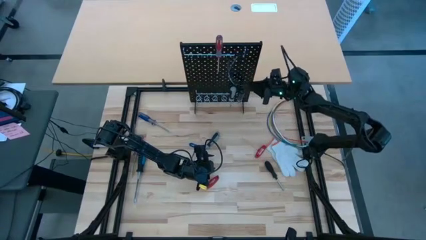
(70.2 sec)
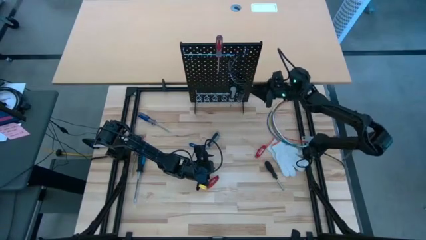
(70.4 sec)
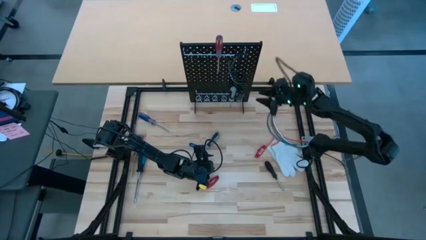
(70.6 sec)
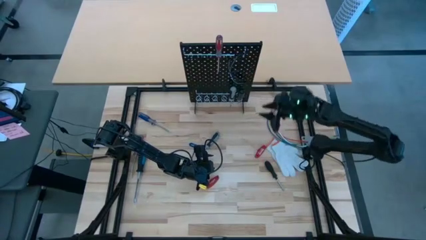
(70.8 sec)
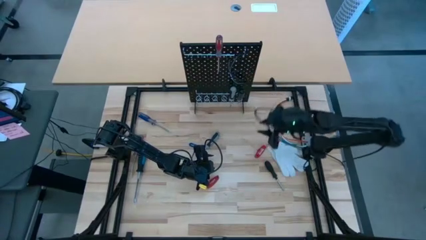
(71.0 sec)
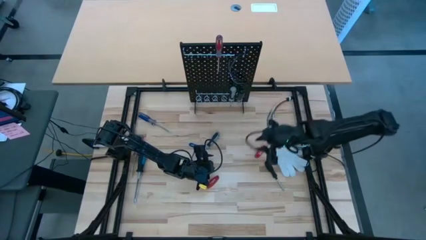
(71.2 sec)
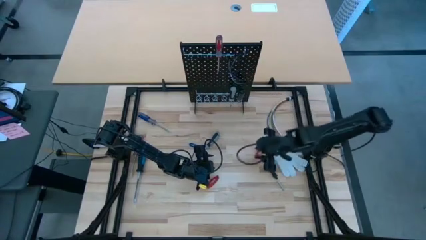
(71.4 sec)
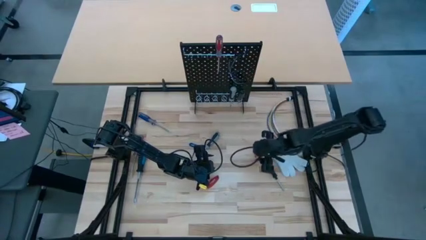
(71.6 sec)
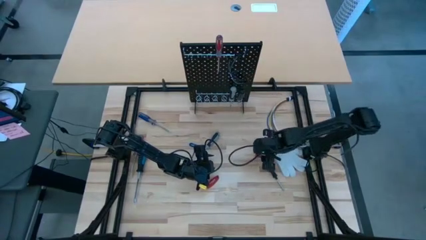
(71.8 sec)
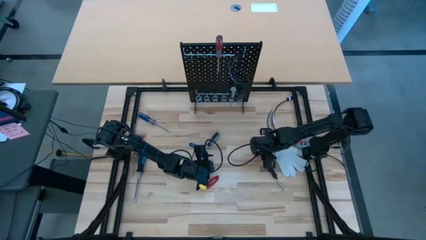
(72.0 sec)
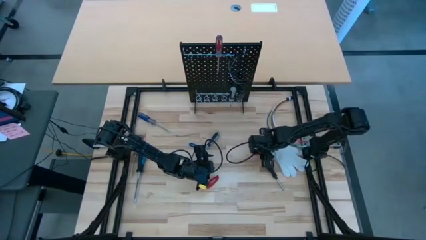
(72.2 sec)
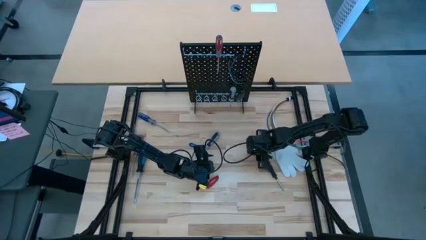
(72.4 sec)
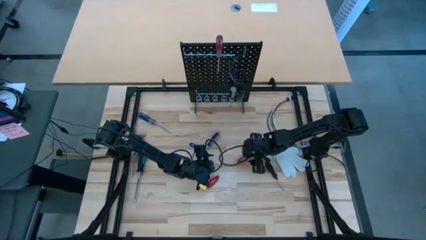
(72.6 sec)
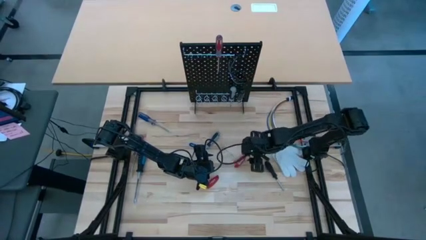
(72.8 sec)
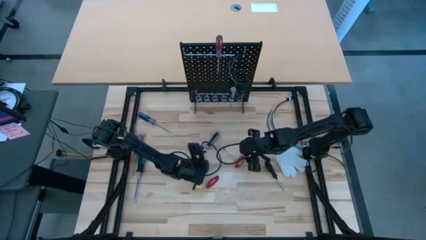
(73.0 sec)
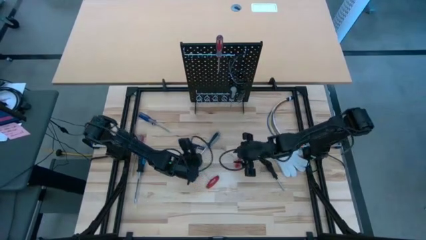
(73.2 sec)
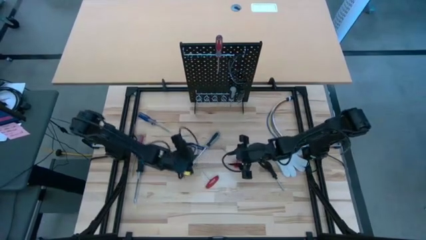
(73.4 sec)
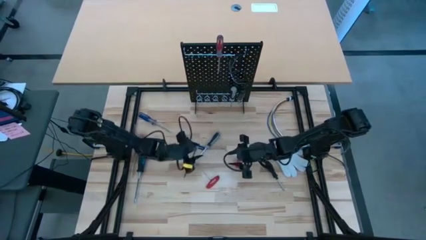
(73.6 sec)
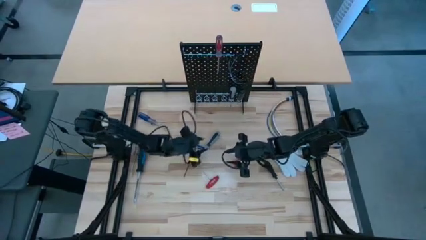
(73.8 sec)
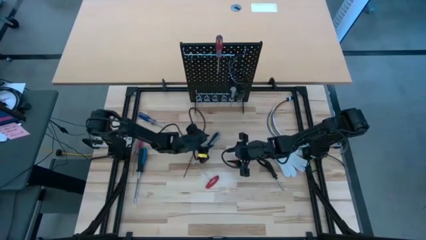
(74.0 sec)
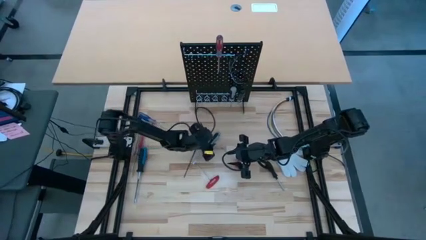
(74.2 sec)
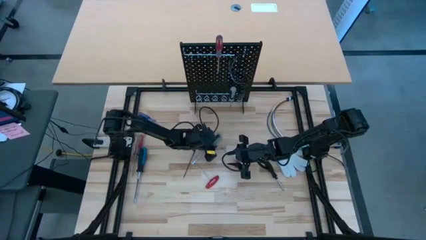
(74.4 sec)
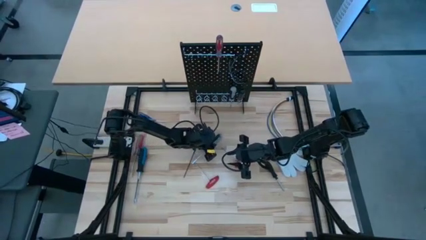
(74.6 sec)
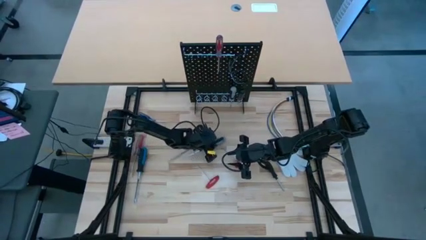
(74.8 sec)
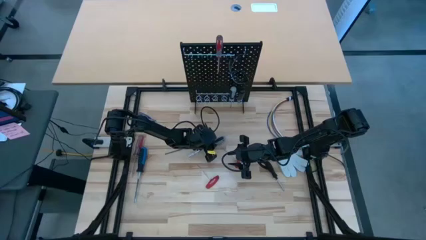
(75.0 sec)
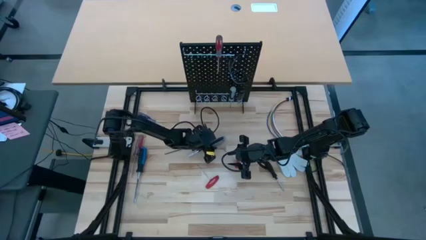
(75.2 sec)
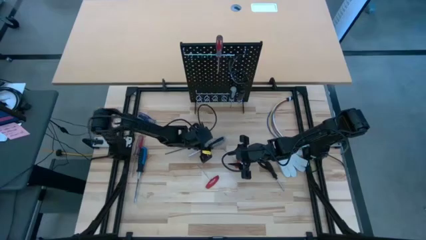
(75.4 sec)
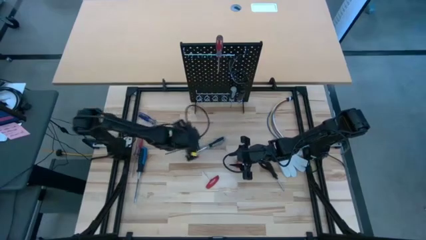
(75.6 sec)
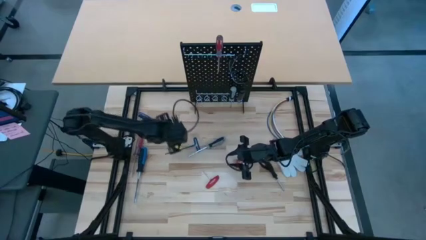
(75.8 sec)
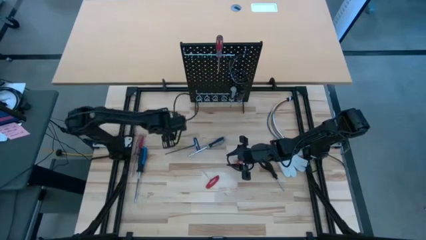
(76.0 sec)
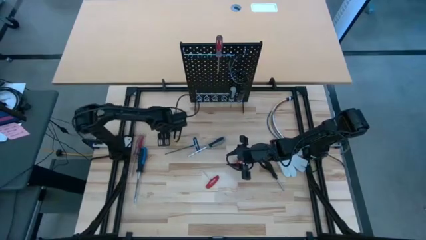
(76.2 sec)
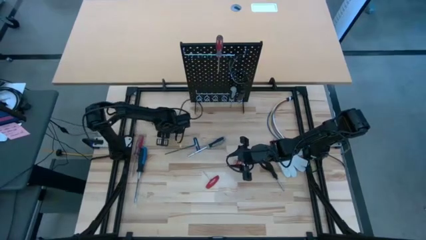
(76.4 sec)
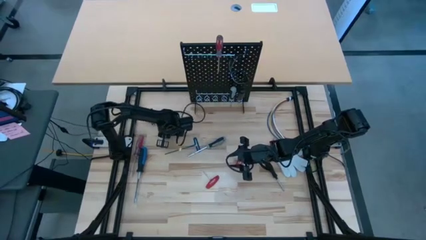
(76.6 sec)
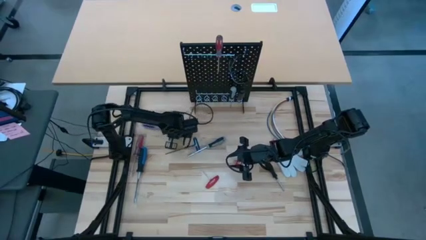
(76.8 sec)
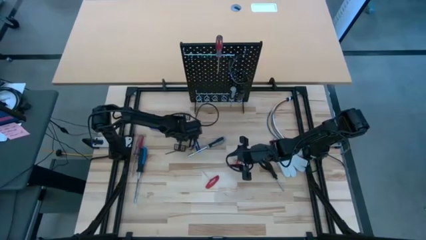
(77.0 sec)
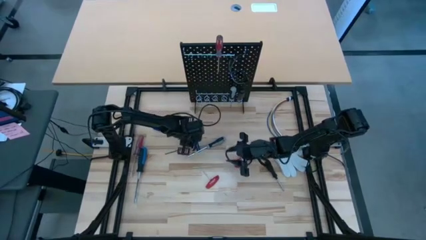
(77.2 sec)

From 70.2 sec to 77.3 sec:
Task: Hang tools onto peg board
Hang the transparent blue screwdriver on the pegboard

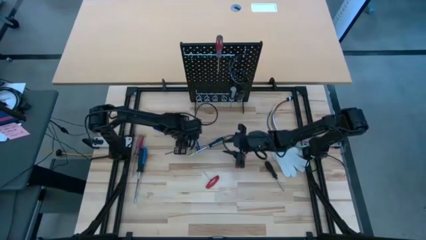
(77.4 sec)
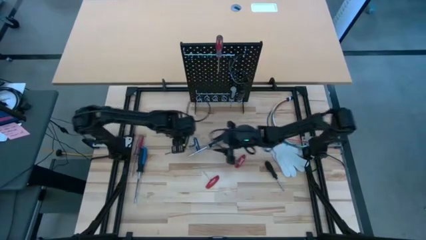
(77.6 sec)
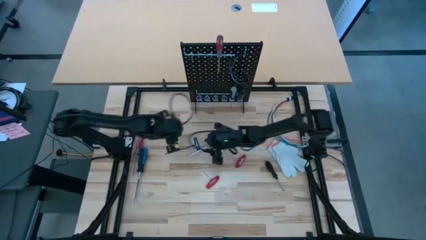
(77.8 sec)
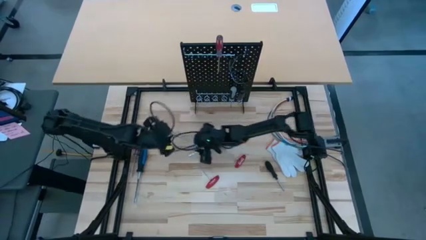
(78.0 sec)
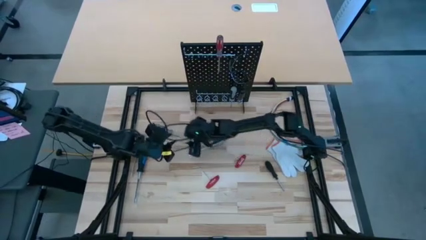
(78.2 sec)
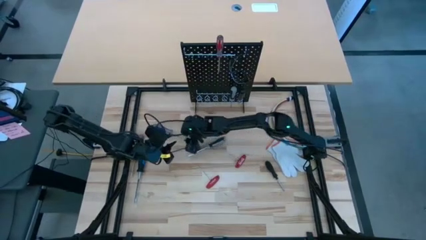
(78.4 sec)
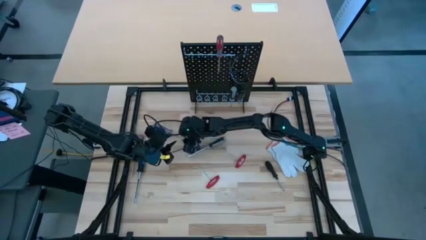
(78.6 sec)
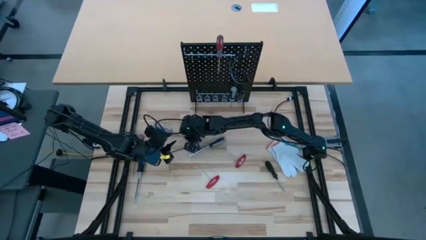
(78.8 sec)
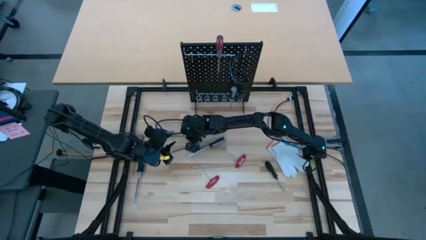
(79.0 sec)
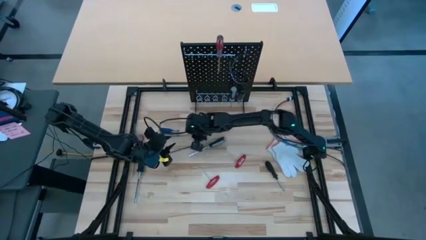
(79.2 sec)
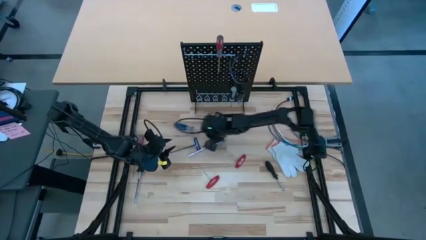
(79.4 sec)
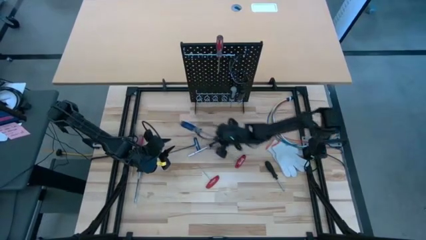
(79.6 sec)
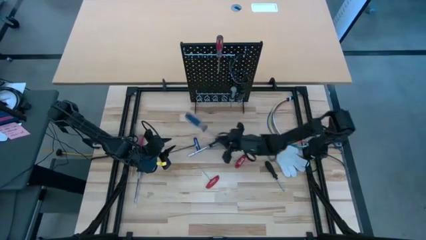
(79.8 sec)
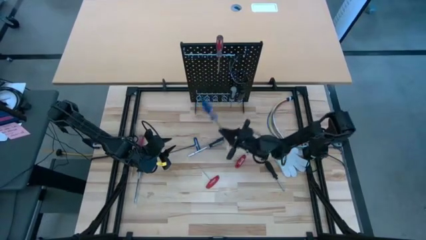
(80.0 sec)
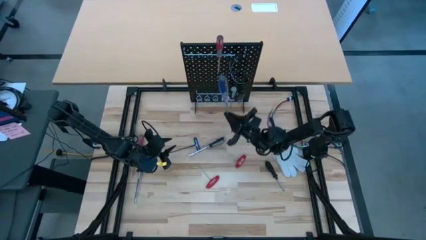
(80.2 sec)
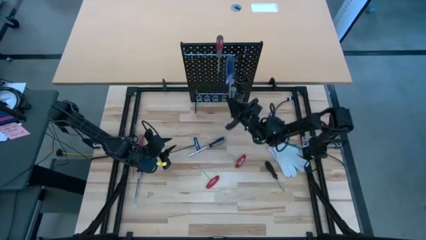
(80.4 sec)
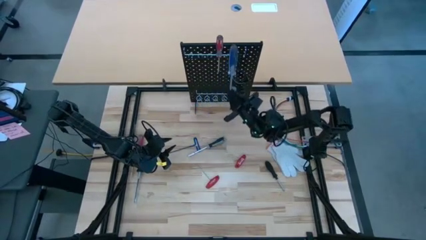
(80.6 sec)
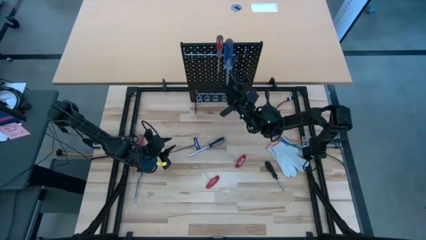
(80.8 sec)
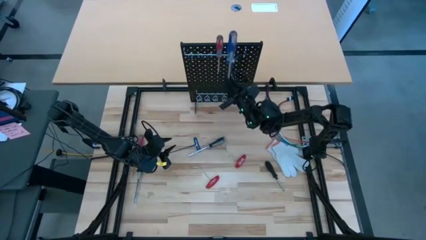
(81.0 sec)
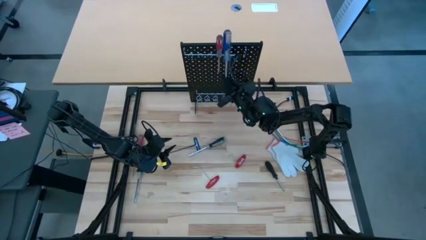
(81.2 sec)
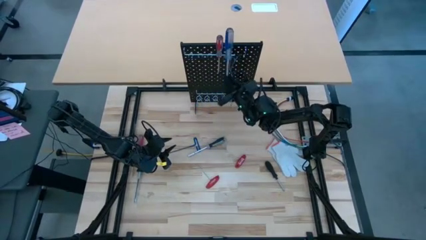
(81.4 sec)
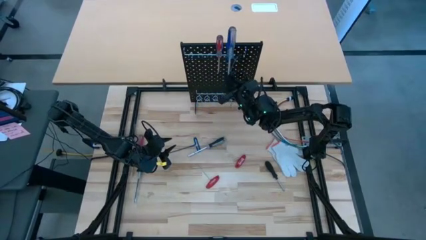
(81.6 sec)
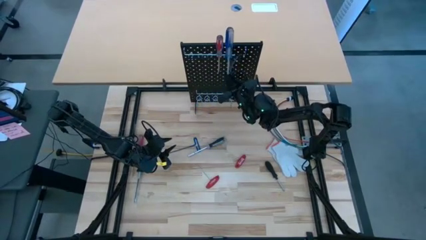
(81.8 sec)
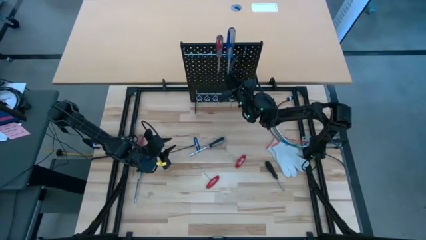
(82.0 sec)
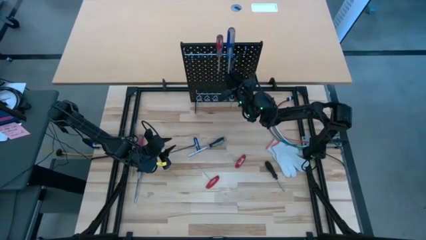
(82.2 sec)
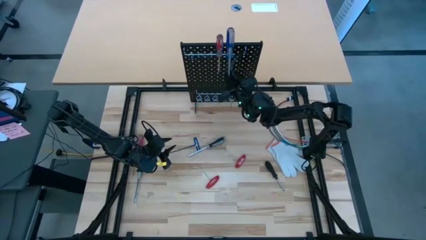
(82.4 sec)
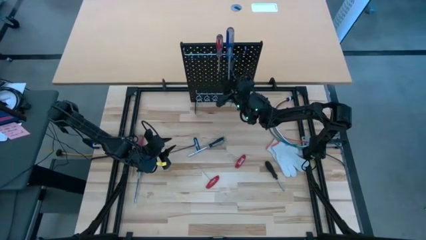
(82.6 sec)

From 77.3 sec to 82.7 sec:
Hang the transparent blue screwdriver on the pegboard
